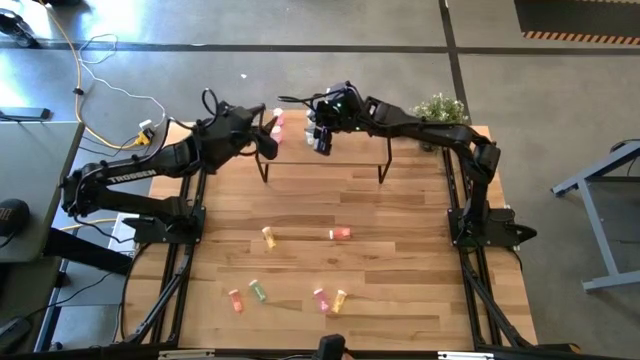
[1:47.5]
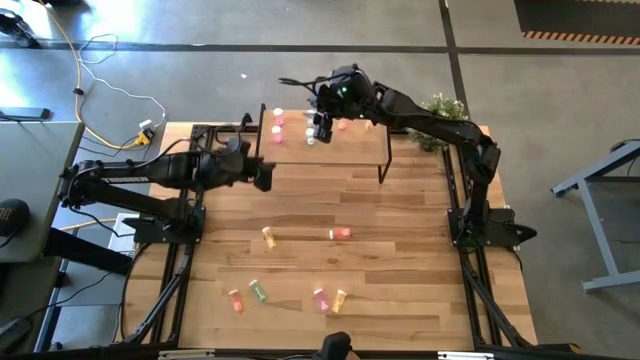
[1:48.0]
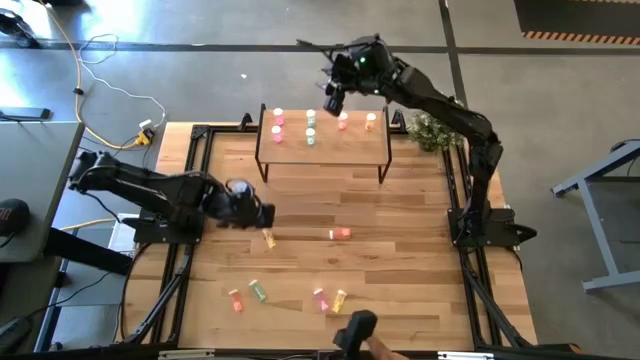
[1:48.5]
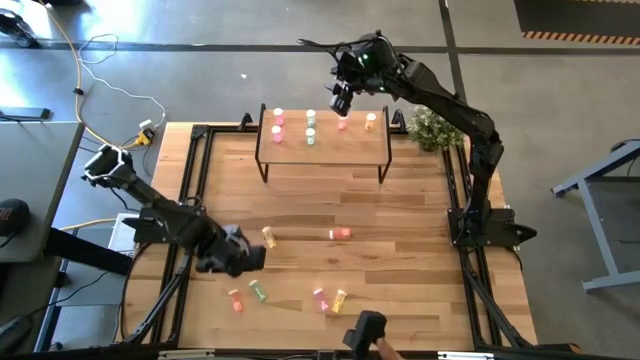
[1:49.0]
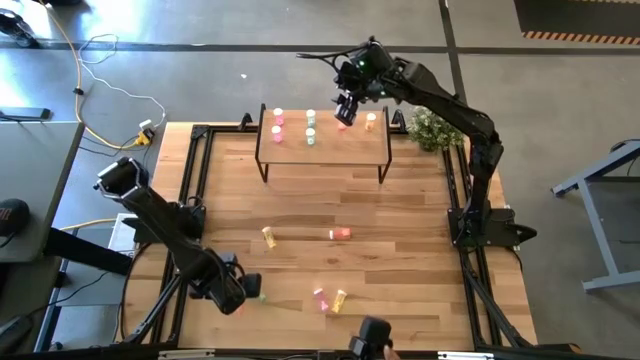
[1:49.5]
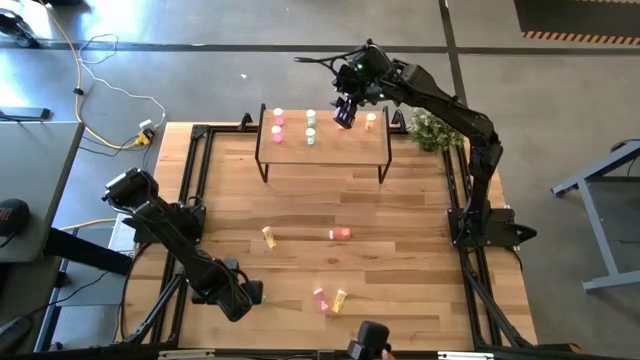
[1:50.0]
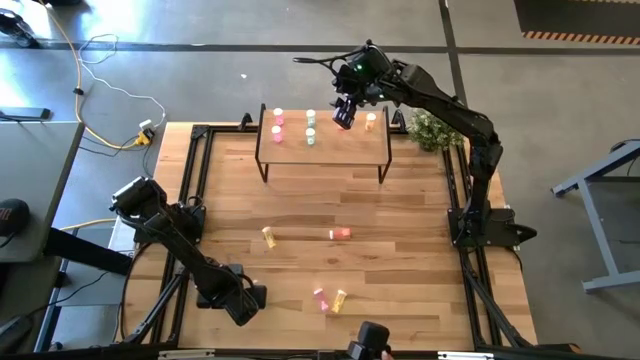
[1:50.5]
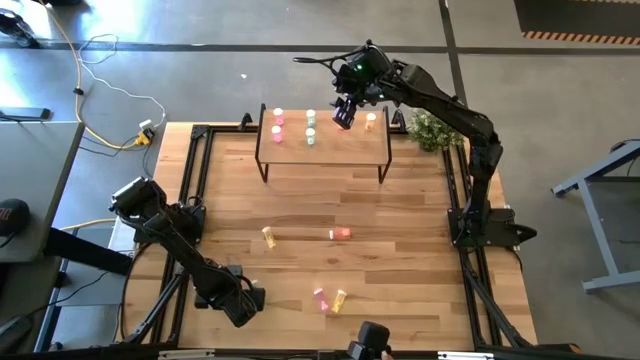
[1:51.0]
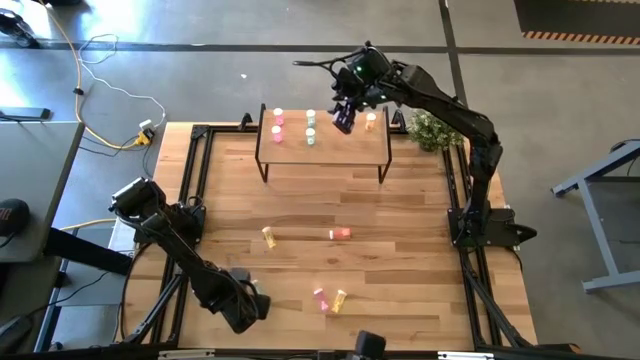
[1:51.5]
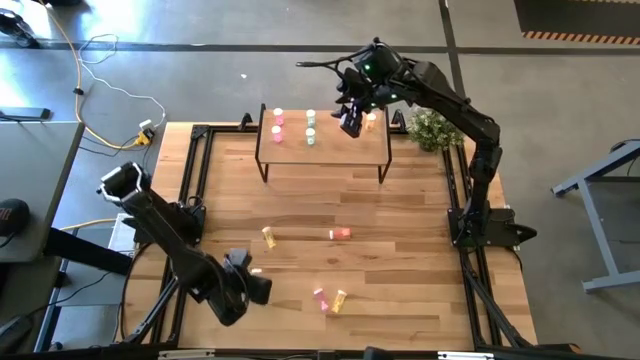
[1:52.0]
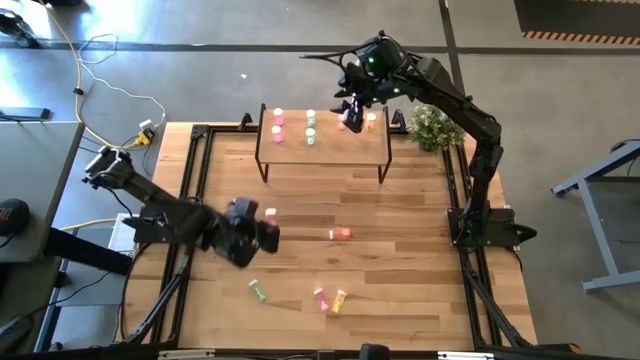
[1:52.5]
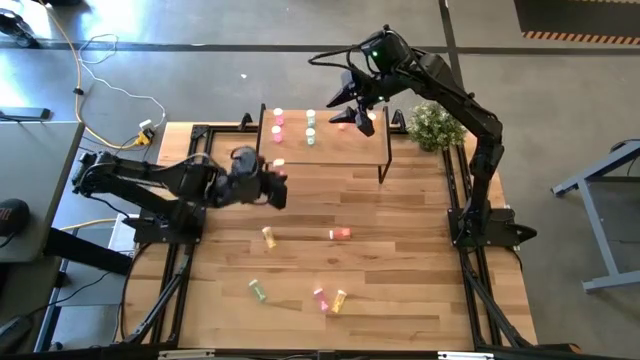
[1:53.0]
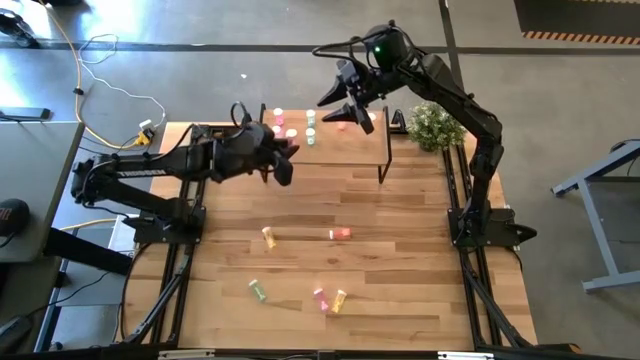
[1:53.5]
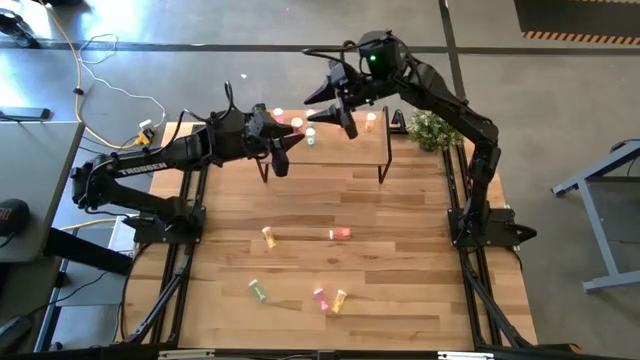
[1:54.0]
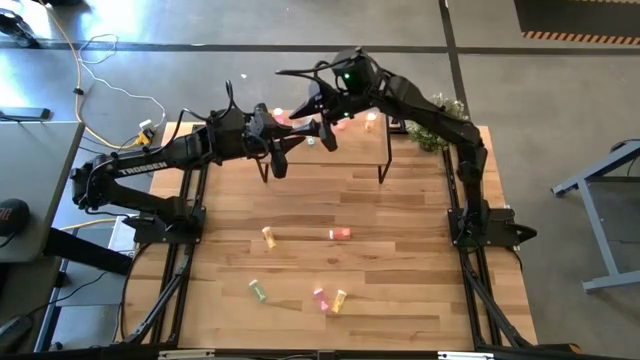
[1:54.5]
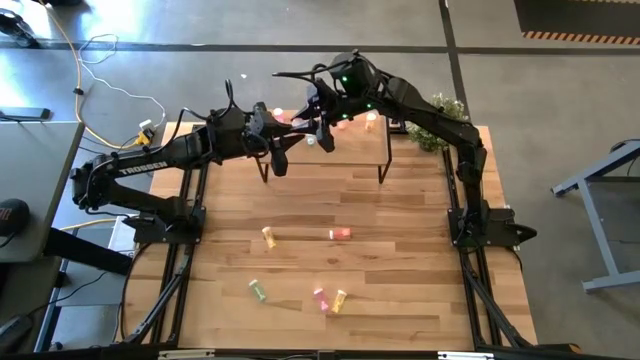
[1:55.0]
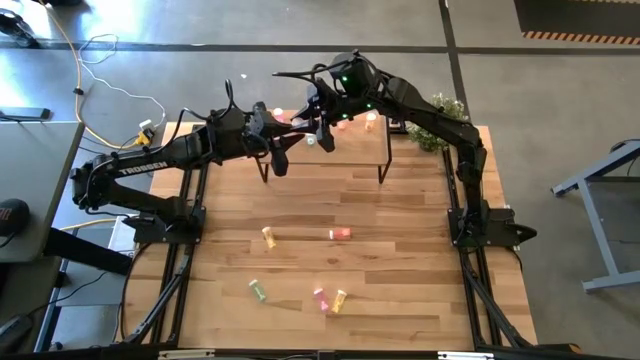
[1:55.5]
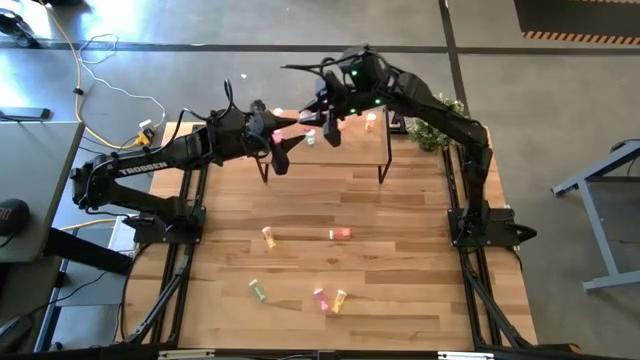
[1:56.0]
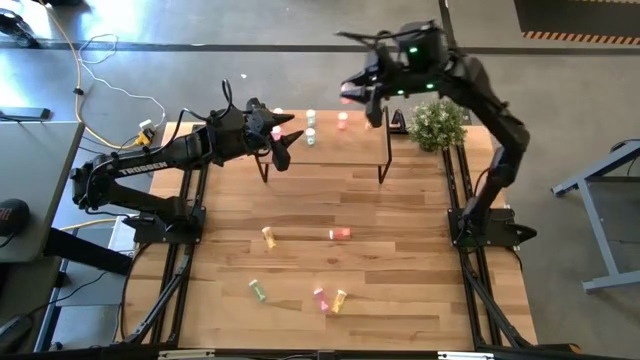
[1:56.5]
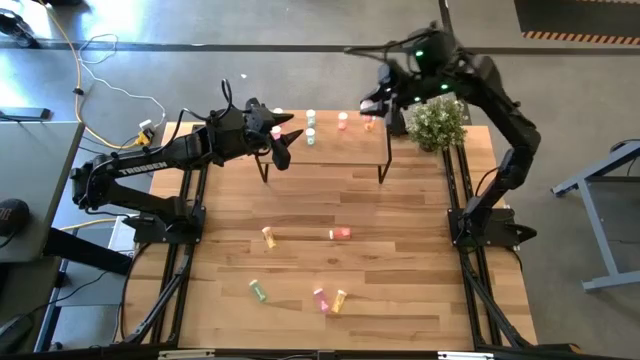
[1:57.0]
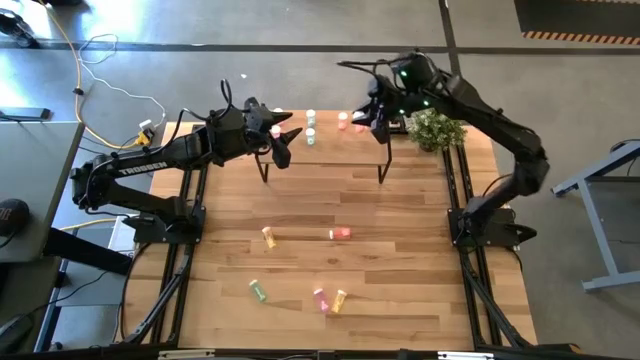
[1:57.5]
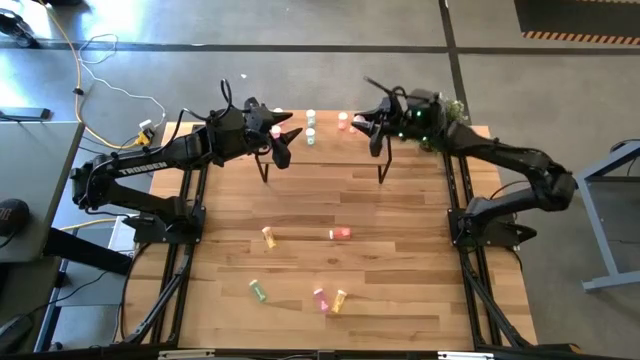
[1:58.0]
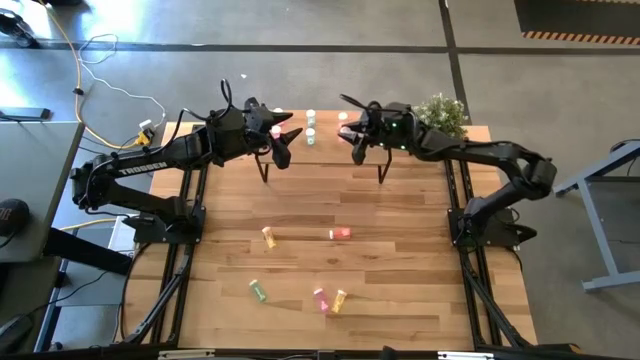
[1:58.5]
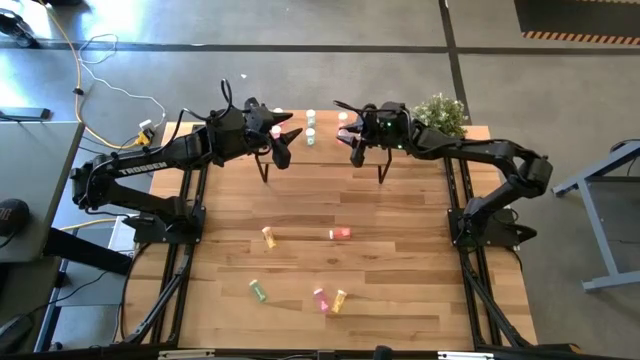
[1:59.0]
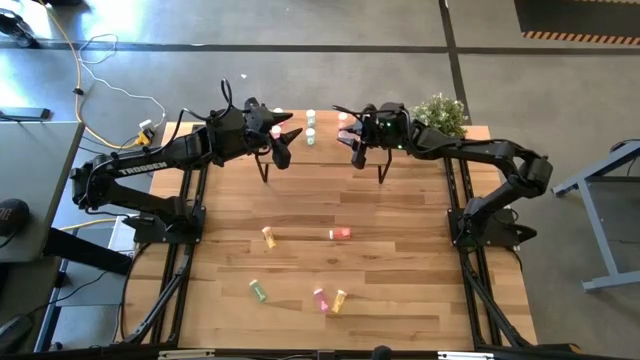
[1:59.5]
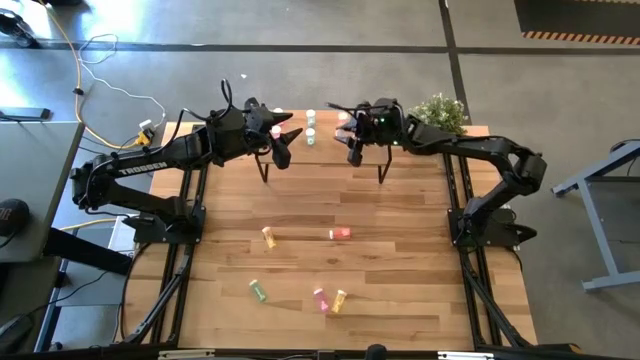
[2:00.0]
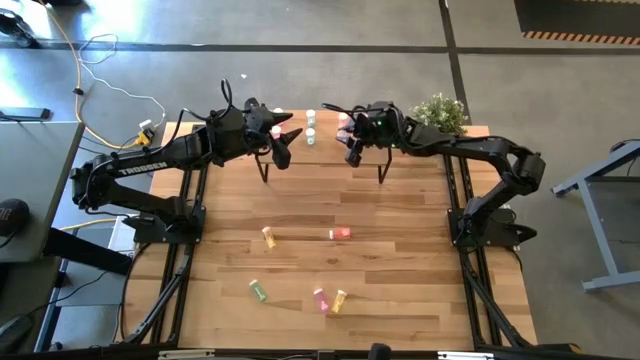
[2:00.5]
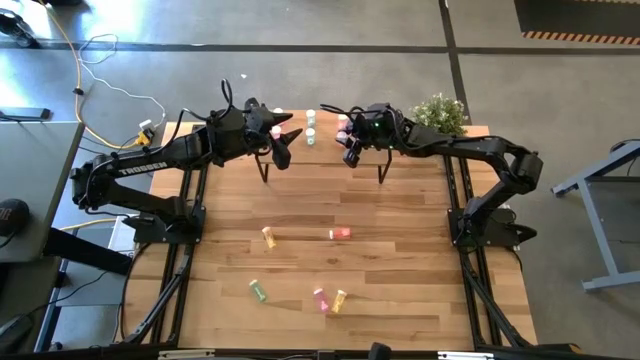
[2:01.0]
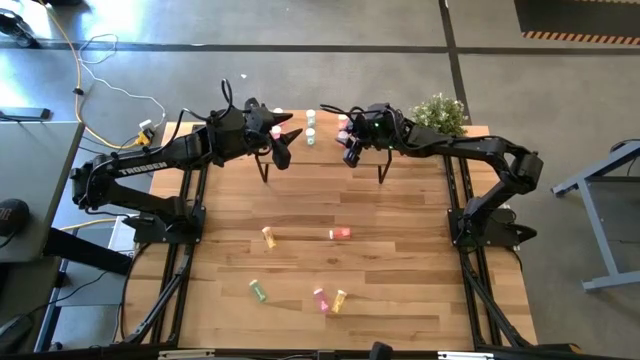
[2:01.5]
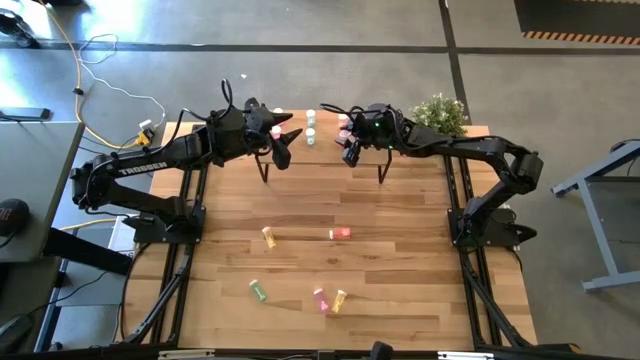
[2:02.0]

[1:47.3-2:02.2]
Task: Pick and place medicine bottles onto shelf by color
Put the bottom orange pill bottle on the shelf aligned with the other orange pill bottle

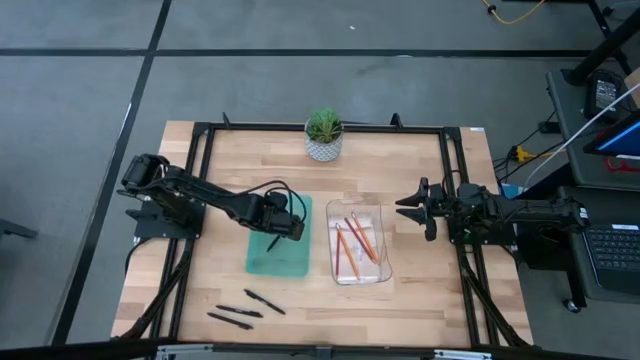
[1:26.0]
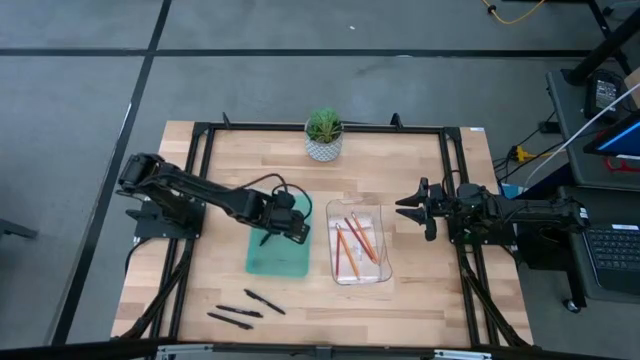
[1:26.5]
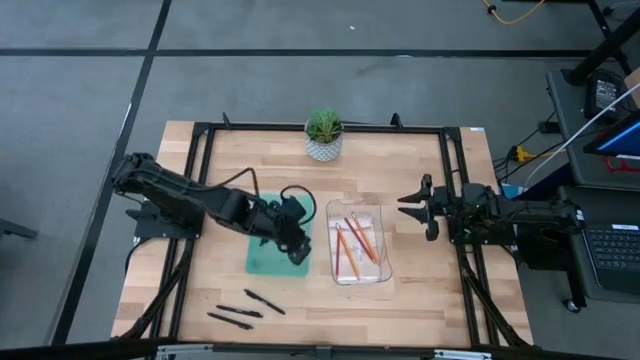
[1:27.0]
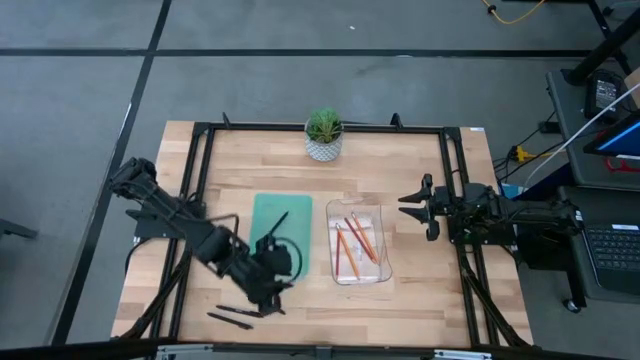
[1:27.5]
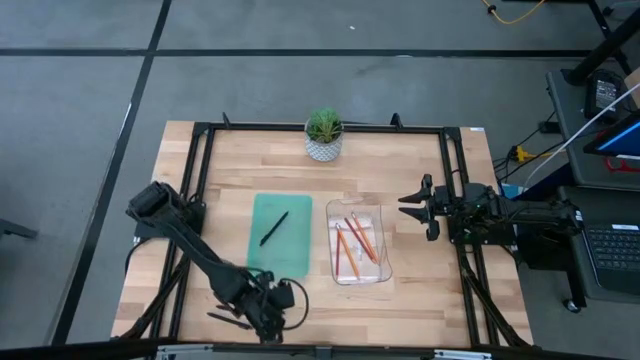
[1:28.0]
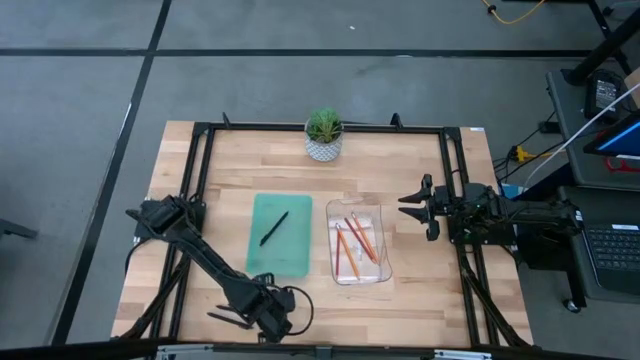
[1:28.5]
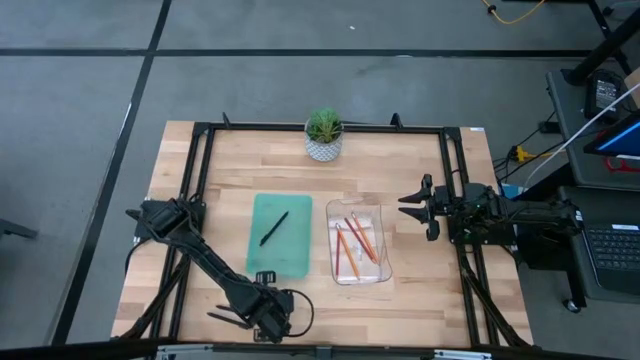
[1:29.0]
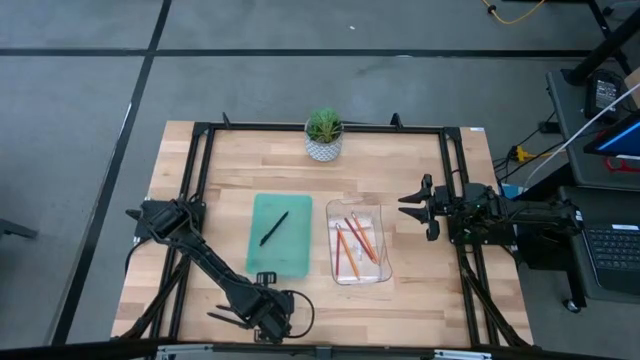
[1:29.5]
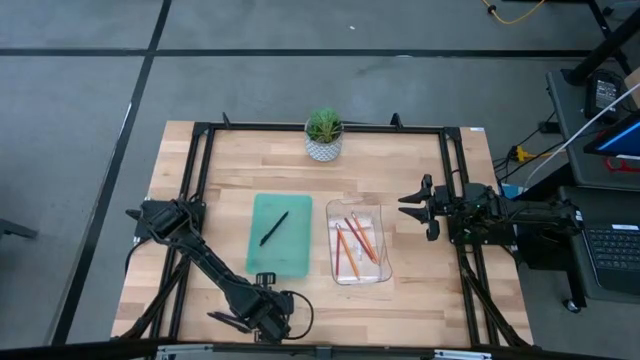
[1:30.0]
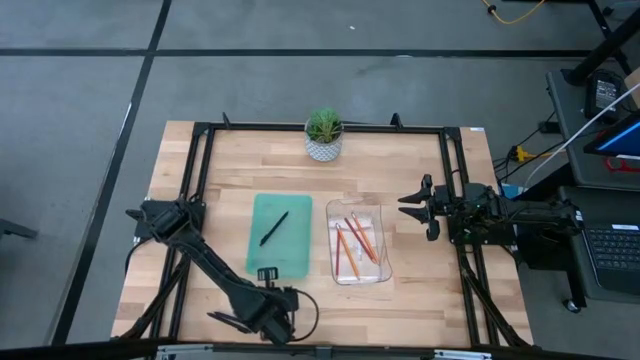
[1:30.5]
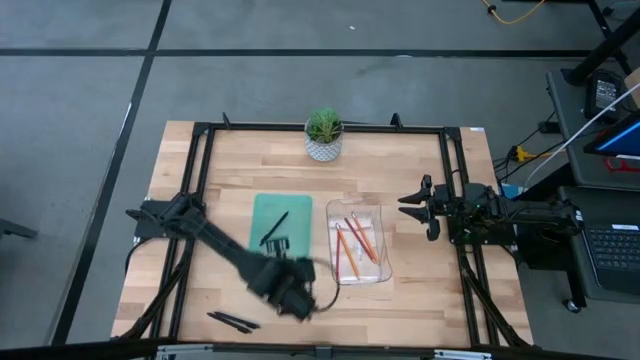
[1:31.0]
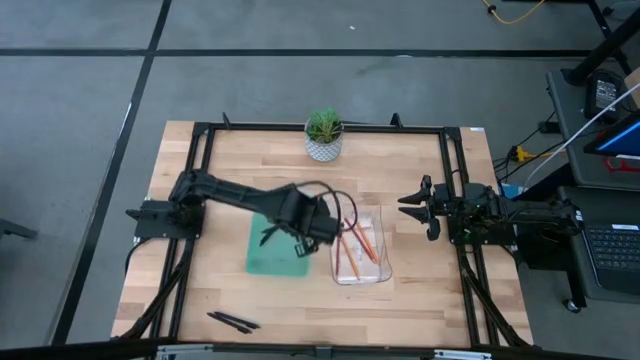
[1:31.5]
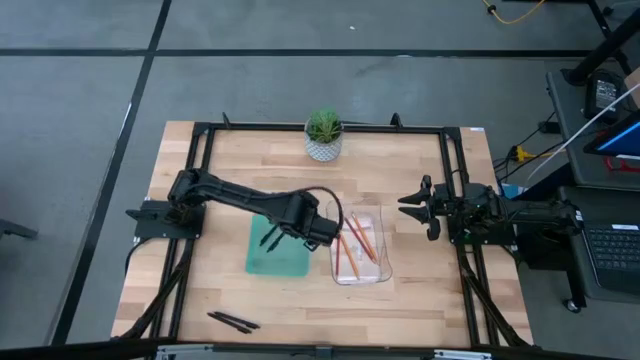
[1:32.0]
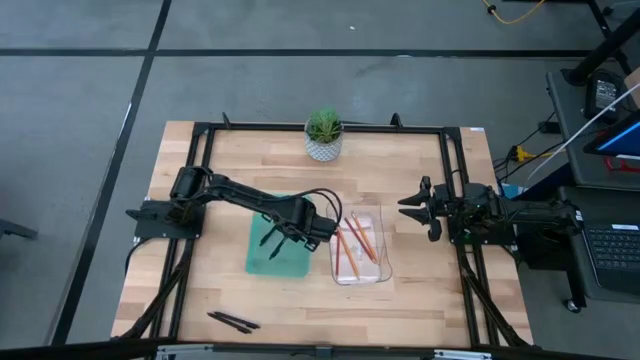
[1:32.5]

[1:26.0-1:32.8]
Task: Sort pens & pencils
Put the black pen into the blue bin
